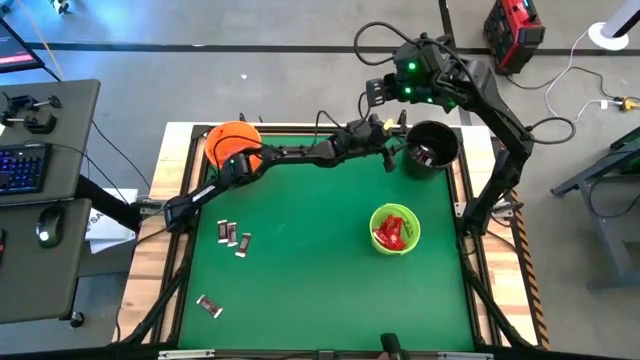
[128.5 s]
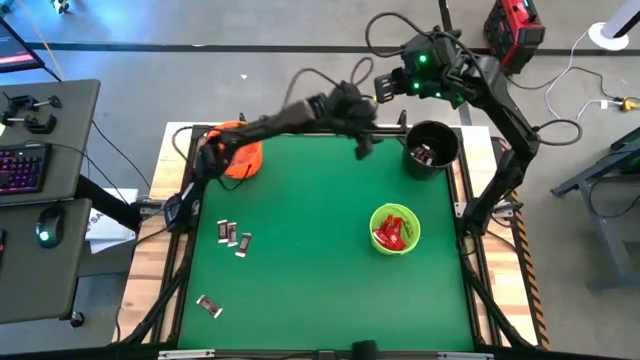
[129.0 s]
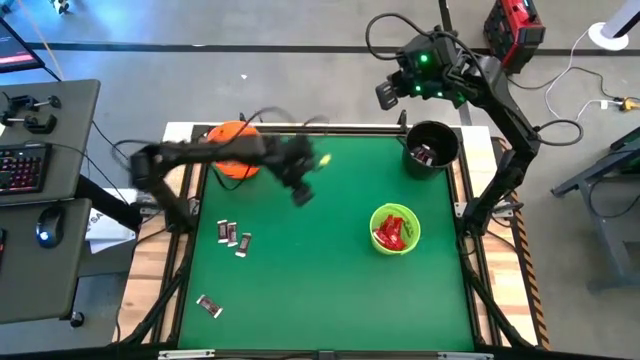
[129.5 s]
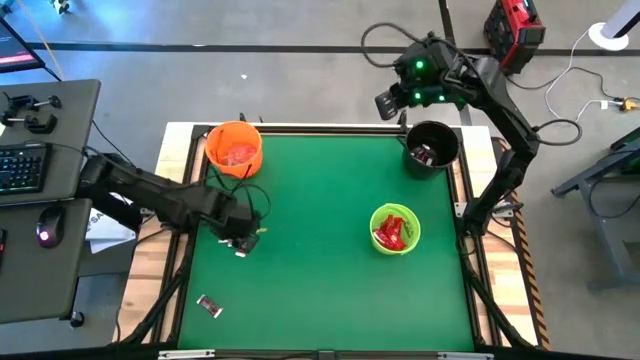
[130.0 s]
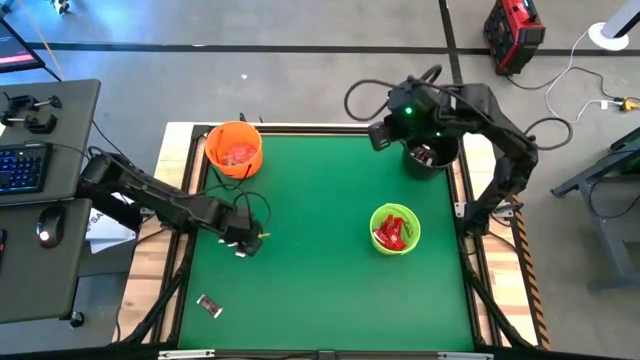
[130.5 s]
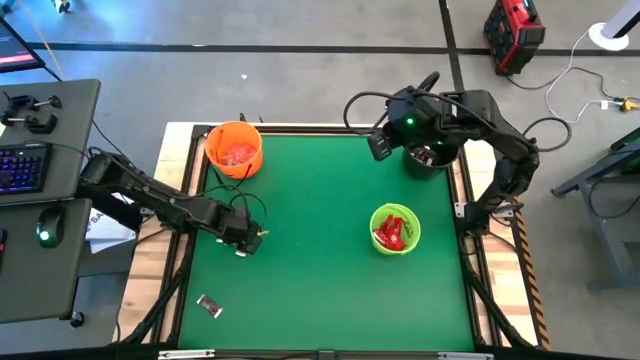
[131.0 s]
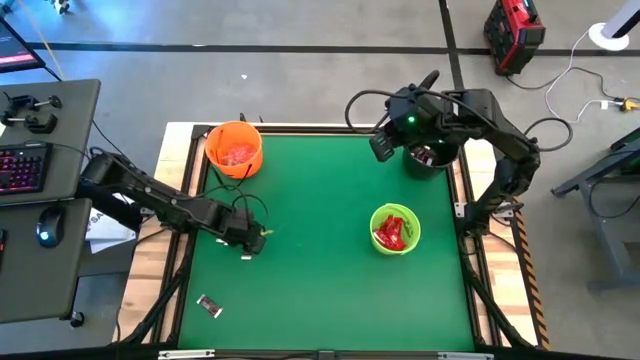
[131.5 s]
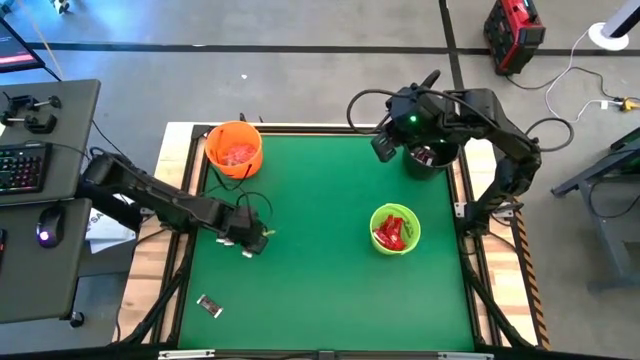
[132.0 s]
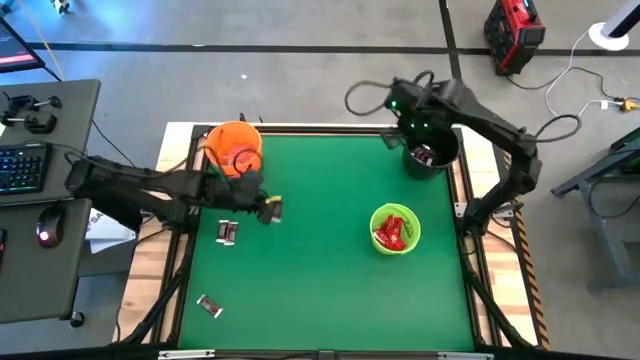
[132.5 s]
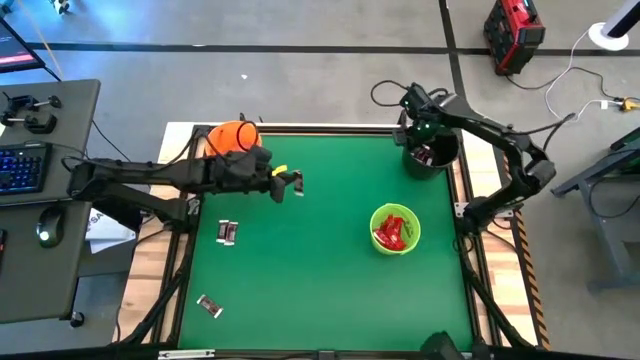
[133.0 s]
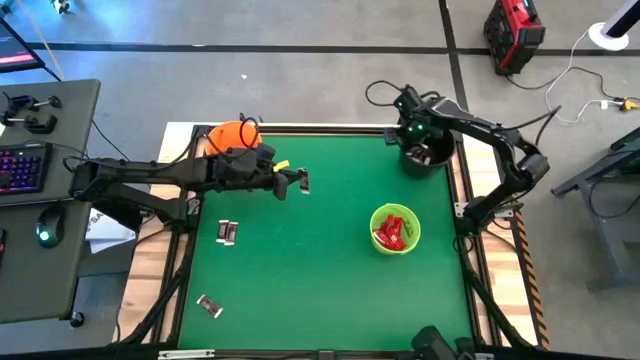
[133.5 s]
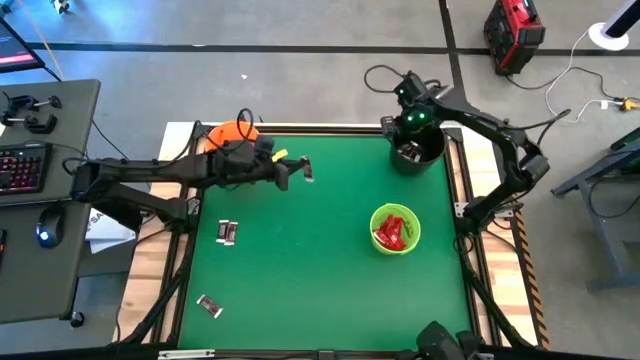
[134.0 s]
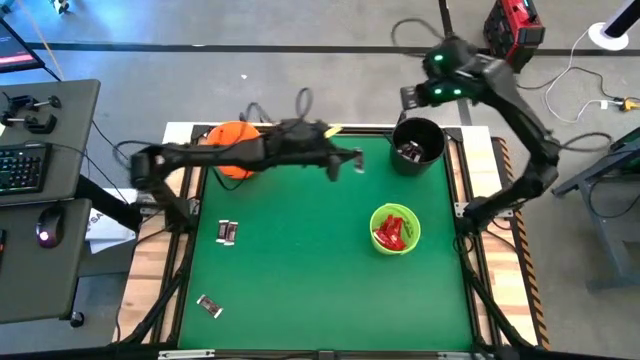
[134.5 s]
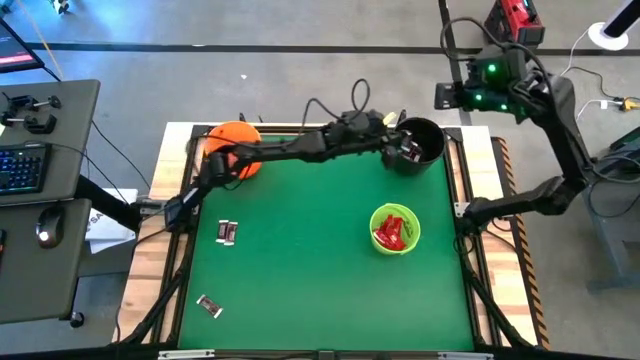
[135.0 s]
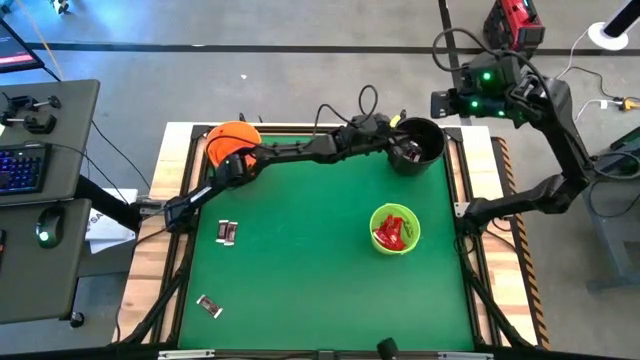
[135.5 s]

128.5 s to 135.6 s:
Task: Sort candy by brand, put in halloween buckets
Put the brown chocolate bar into the black bucket

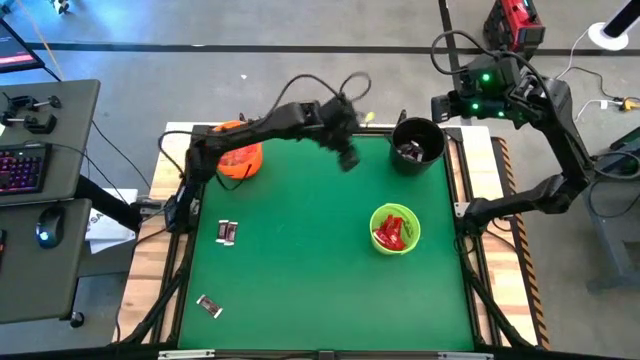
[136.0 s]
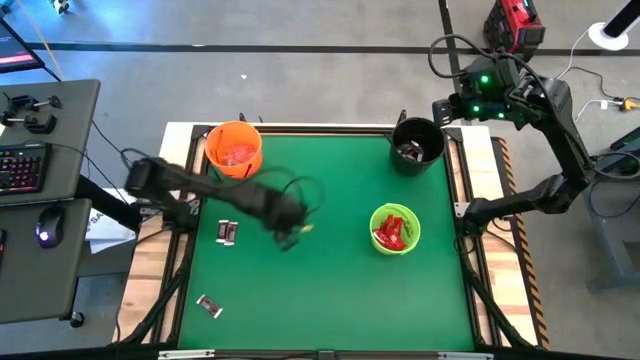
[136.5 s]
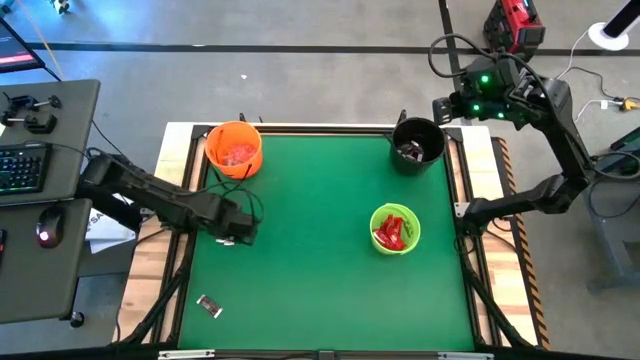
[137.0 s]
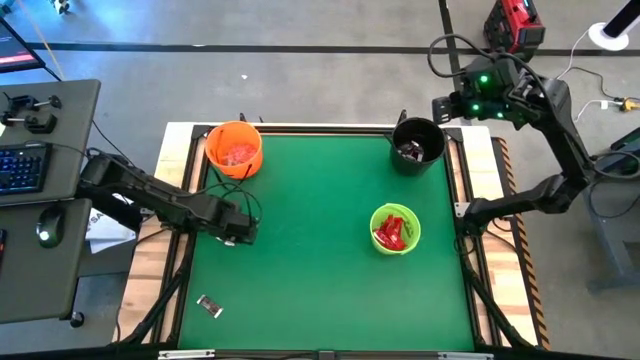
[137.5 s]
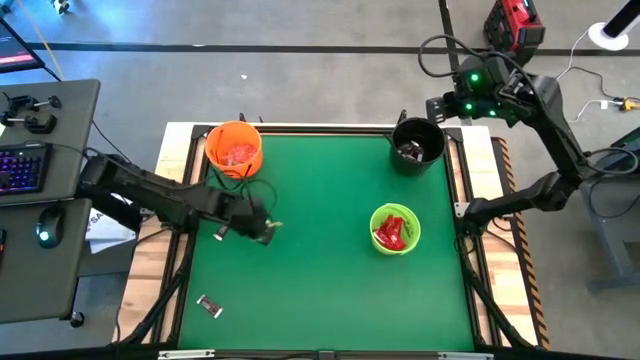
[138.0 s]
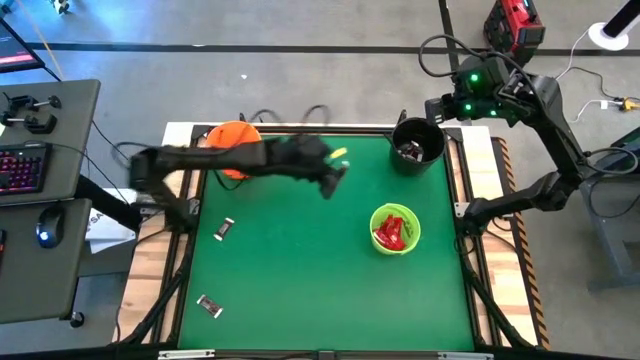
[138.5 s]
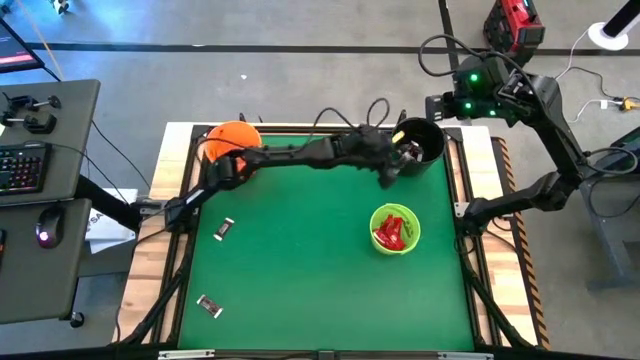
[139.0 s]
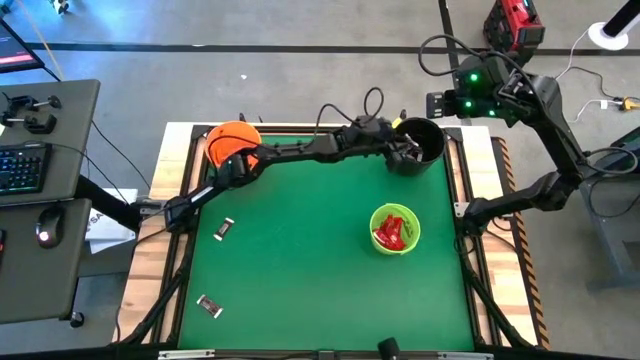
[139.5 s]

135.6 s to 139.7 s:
Put the brown chocolate bar into the black bucket

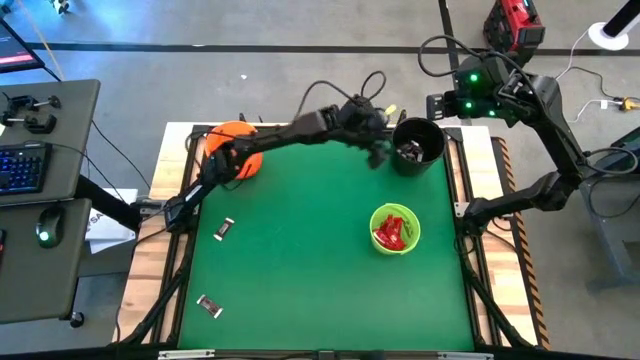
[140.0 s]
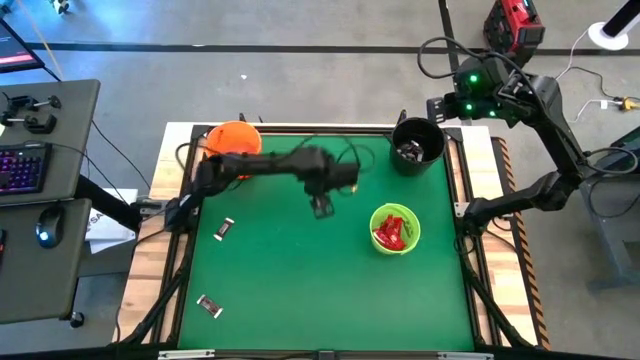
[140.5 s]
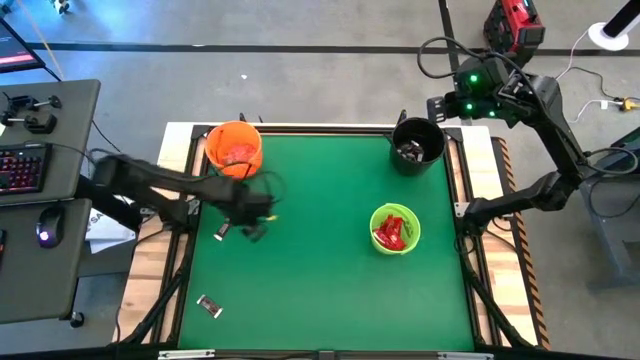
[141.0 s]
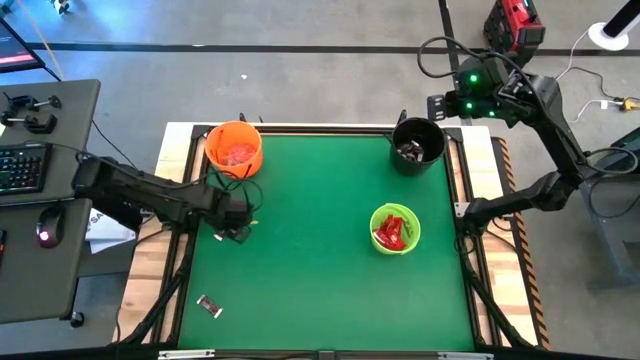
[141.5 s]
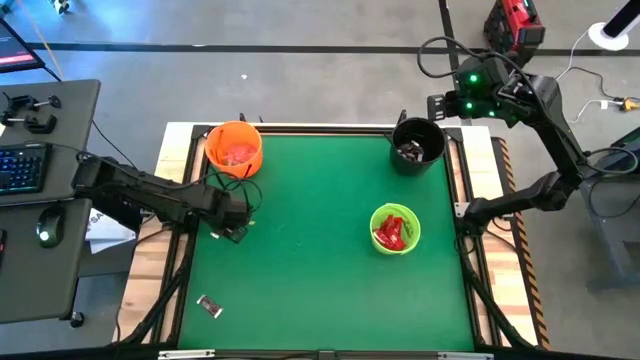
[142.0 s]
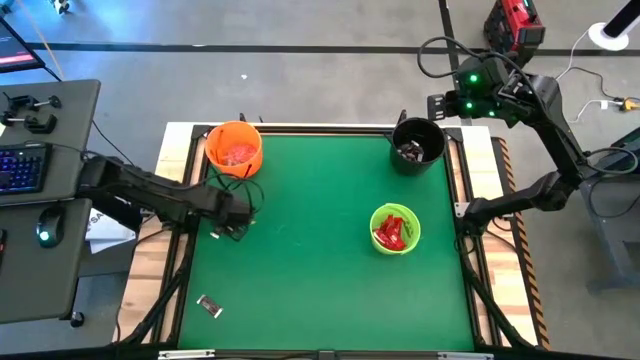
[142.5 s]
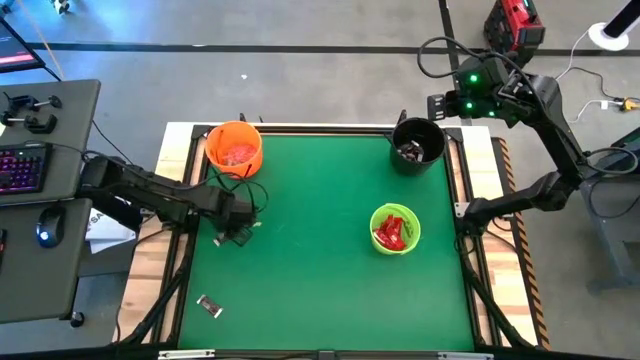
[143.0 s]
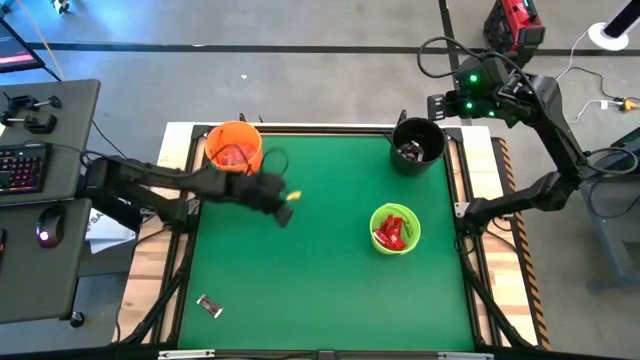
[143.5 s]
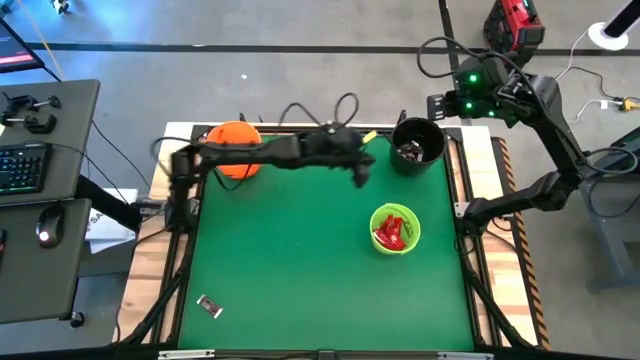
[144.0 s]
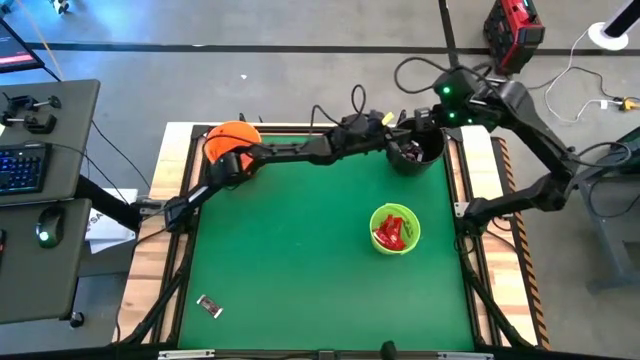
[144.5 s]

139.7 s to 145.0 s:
Put the brown chocolate bar into the black bucket

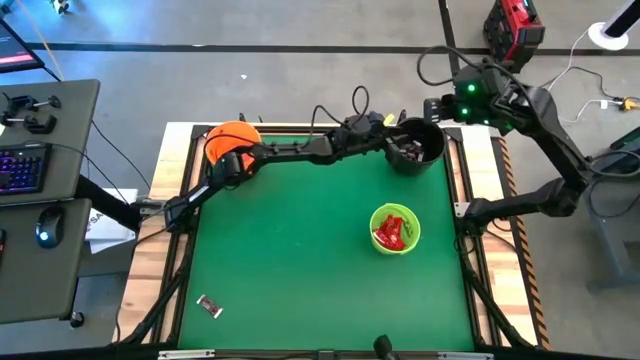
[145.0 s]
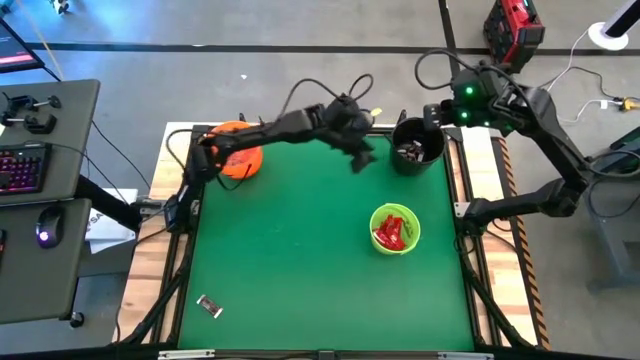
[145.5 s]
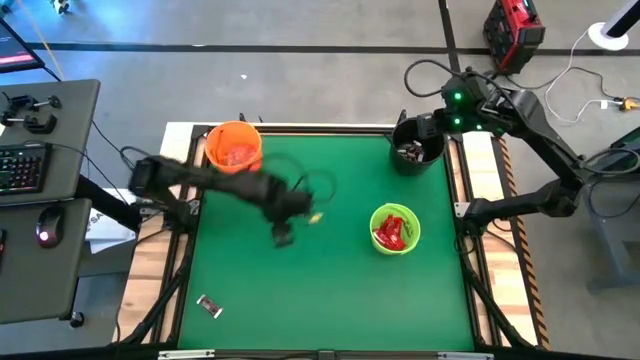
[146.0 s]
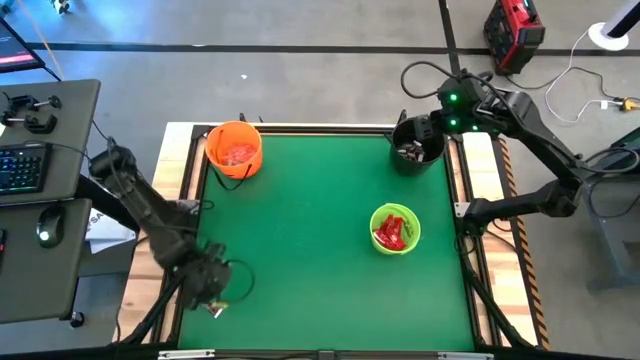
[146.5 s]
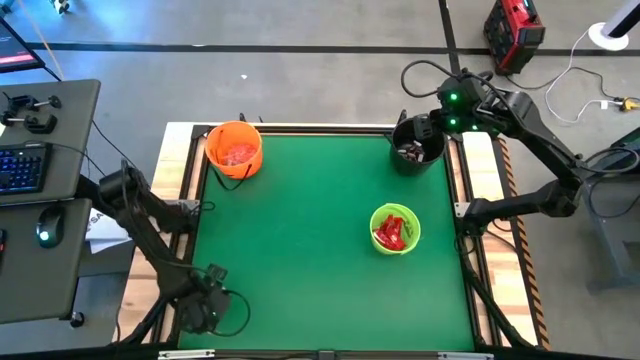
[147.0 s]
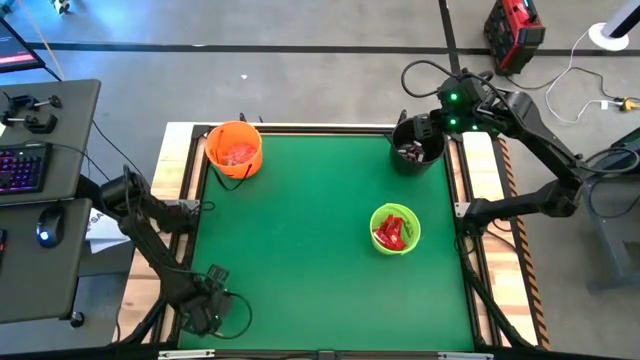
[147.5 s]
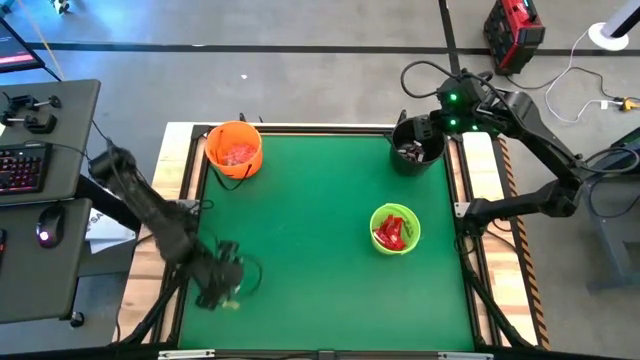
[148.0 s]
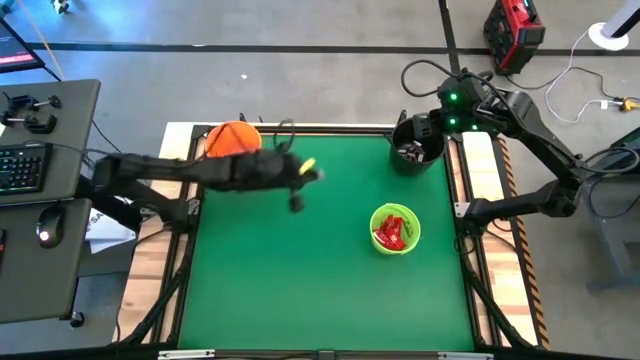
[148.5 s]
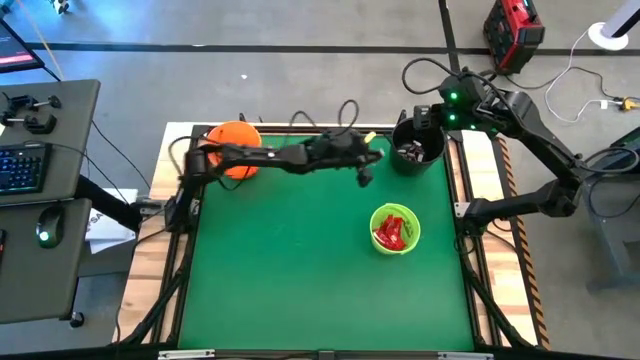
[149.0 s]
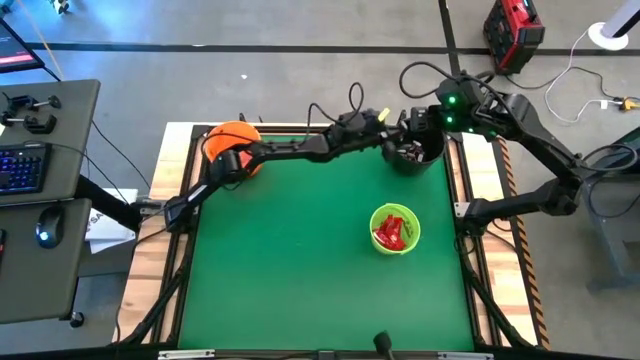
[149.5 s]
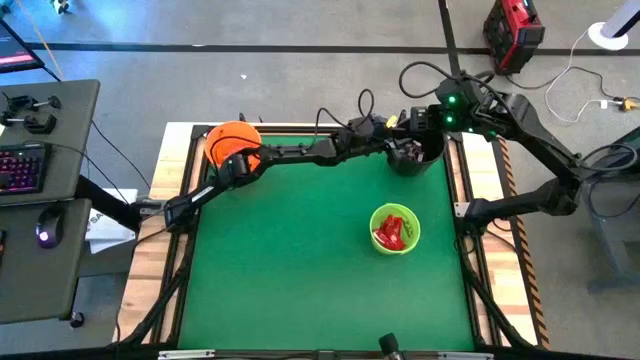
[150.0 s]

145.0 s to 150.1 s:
Put the brown chocolate bar into the black bucket
